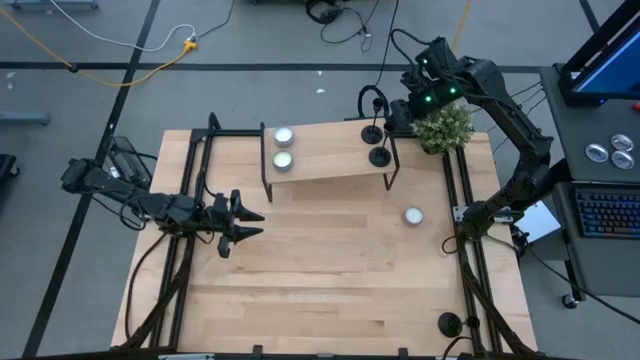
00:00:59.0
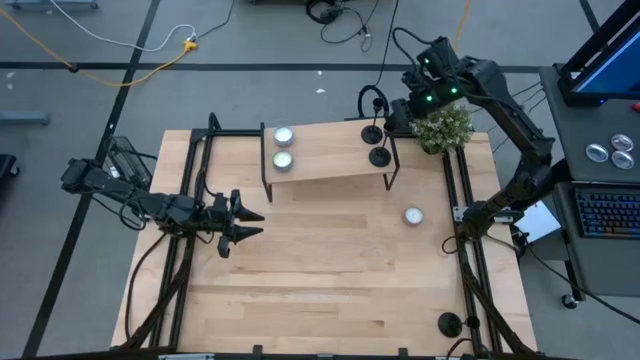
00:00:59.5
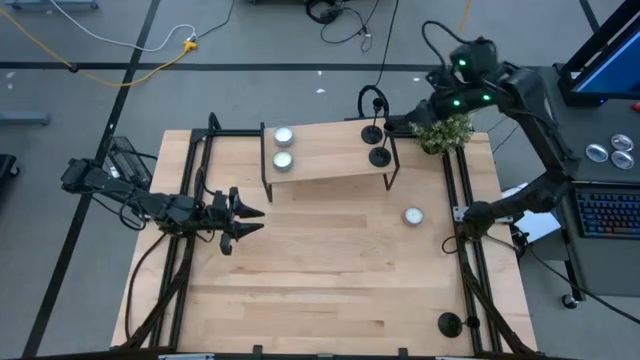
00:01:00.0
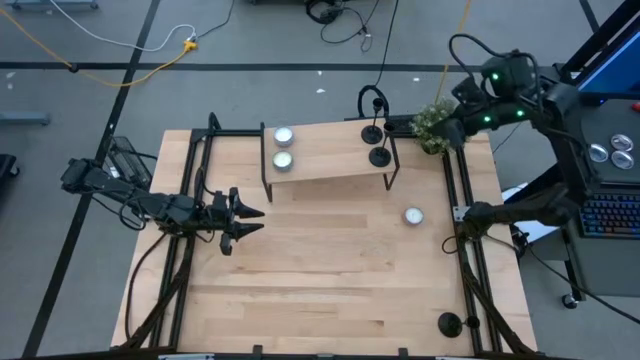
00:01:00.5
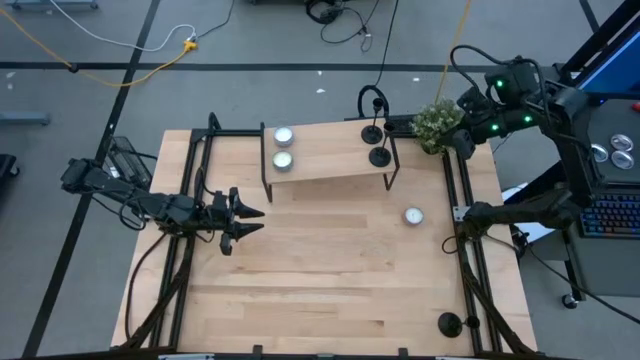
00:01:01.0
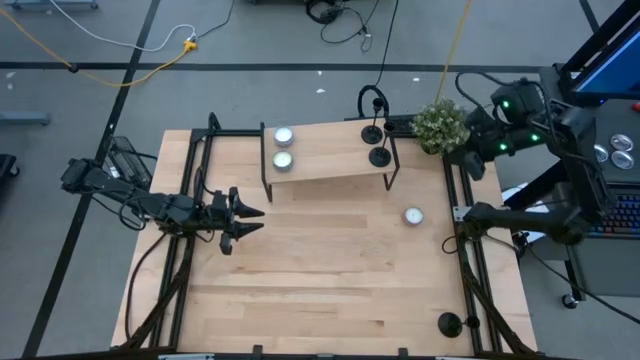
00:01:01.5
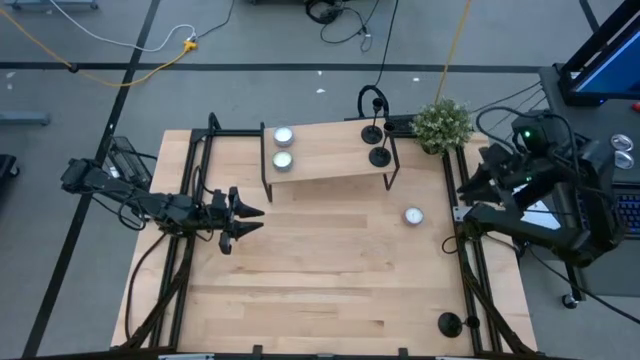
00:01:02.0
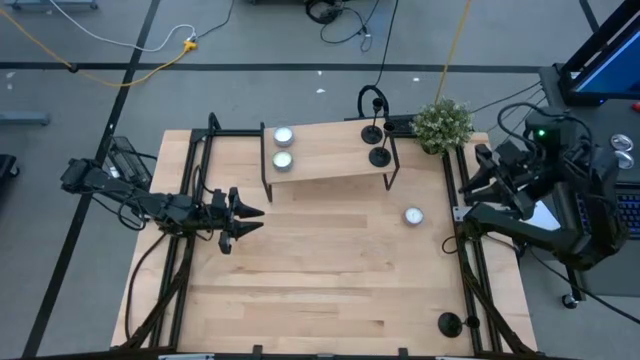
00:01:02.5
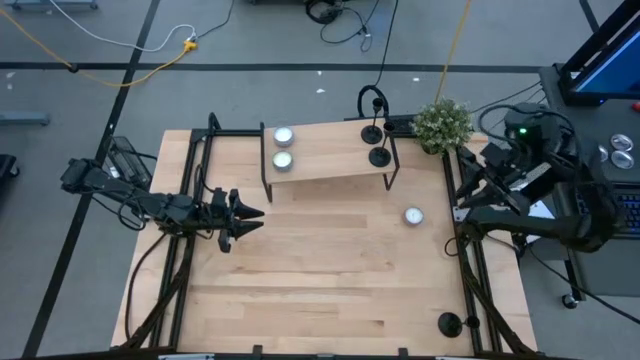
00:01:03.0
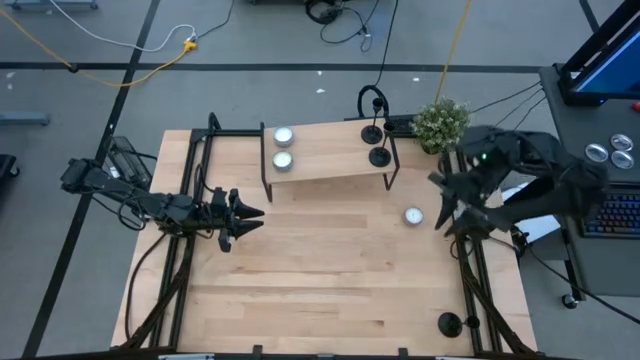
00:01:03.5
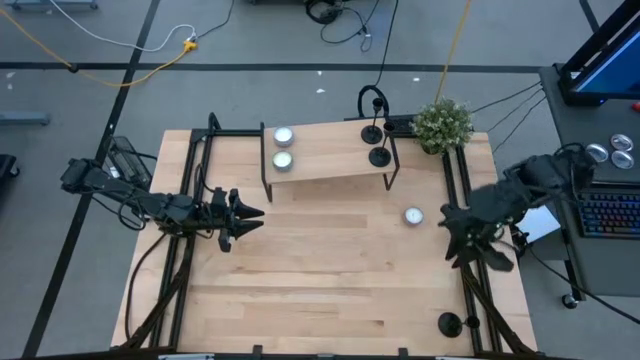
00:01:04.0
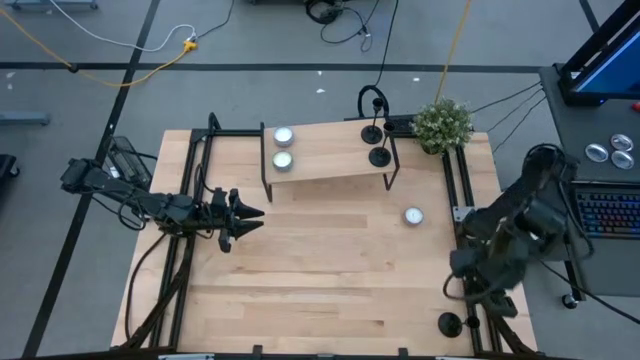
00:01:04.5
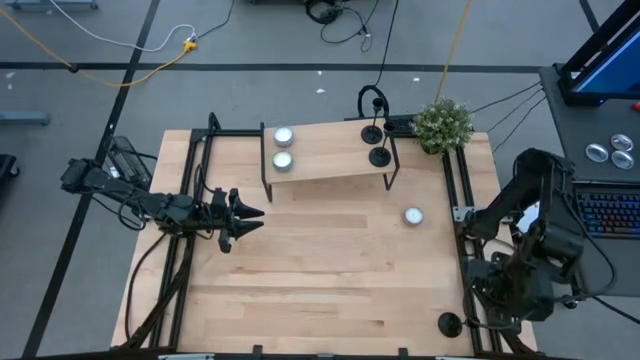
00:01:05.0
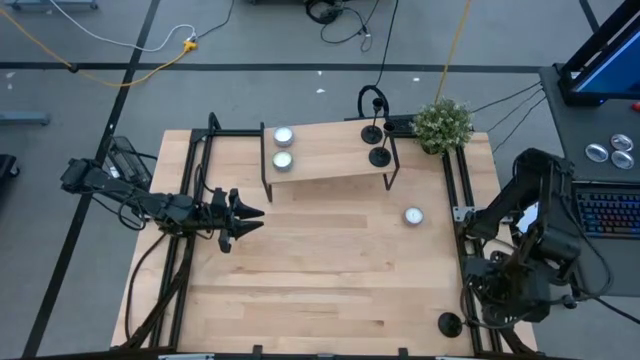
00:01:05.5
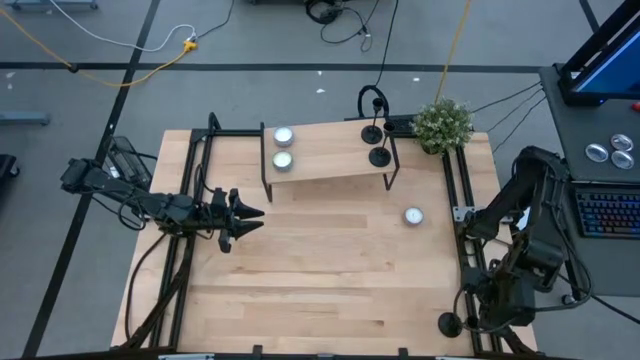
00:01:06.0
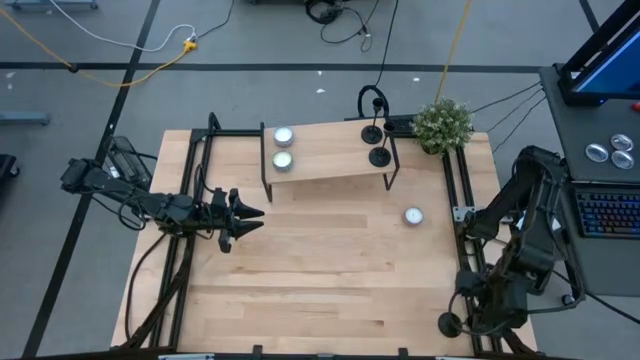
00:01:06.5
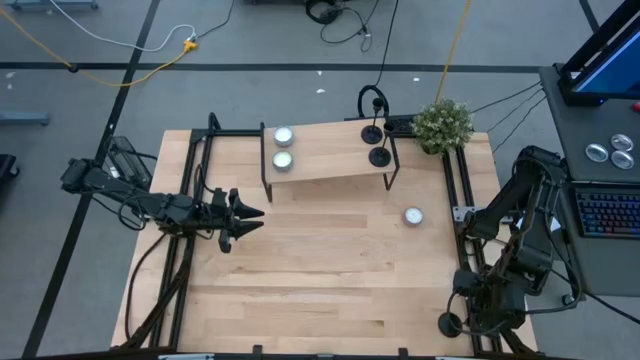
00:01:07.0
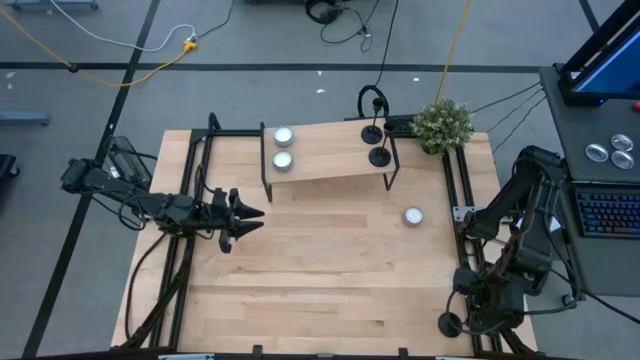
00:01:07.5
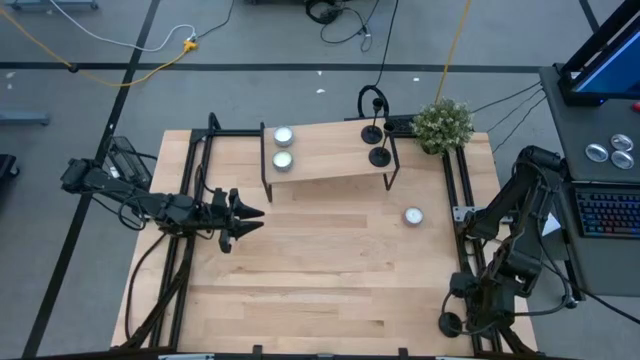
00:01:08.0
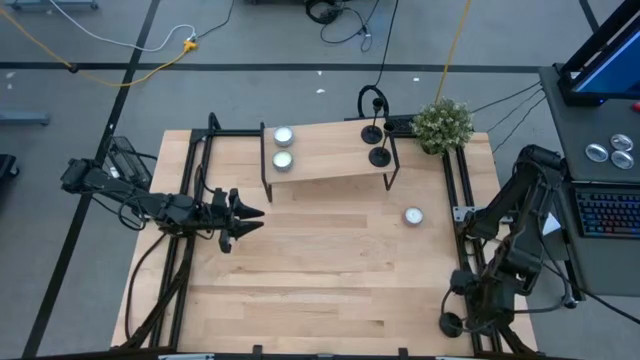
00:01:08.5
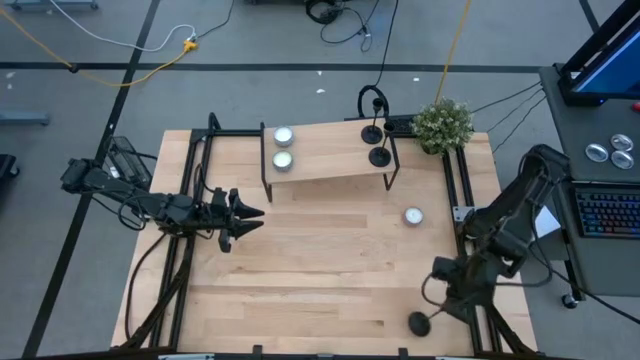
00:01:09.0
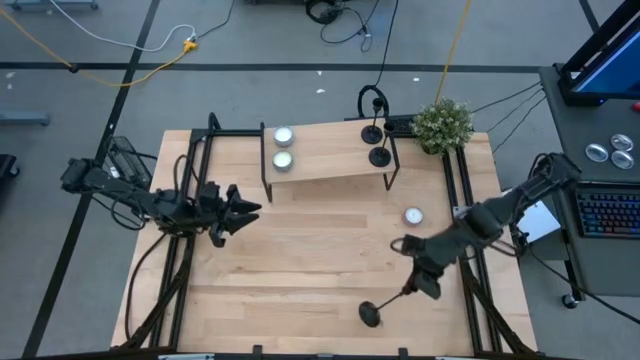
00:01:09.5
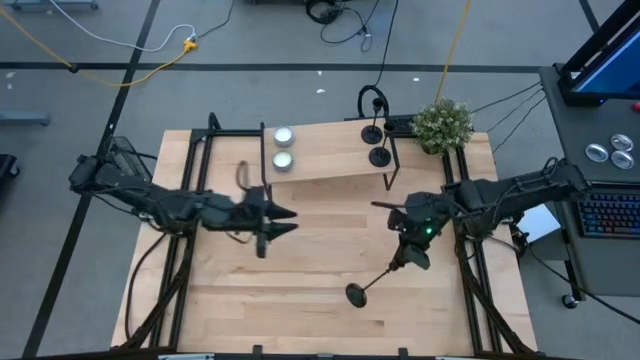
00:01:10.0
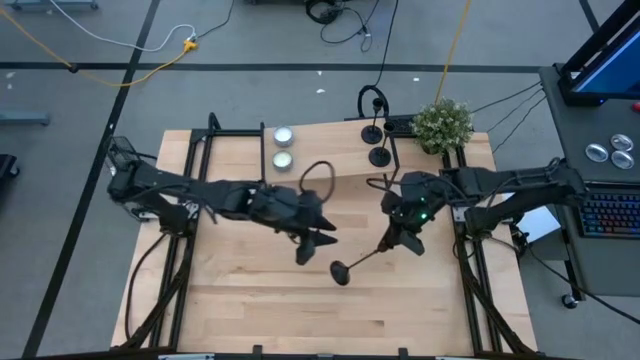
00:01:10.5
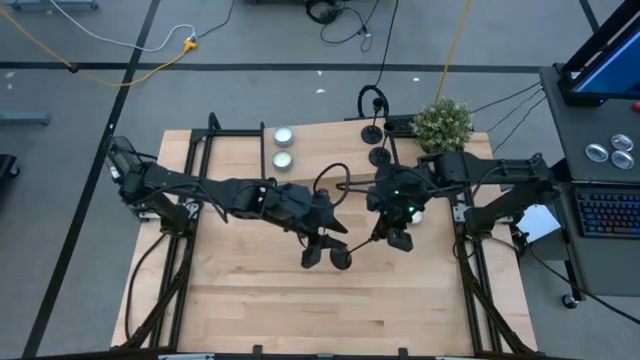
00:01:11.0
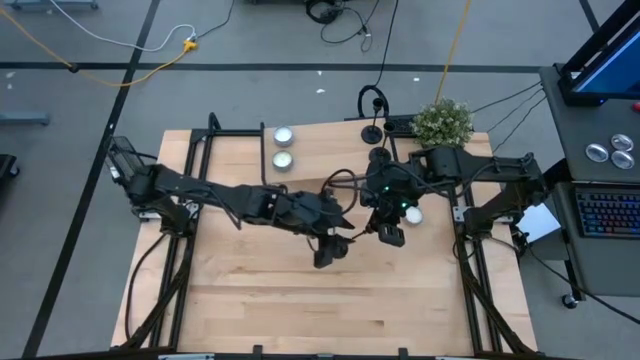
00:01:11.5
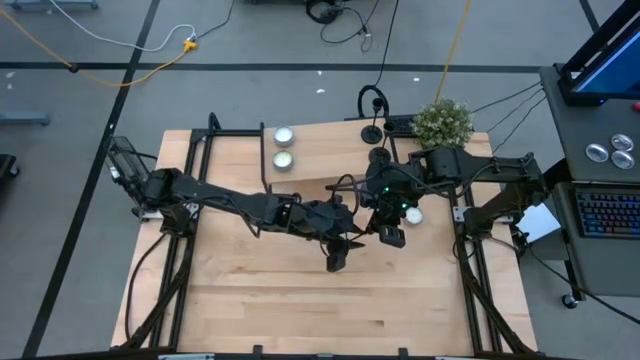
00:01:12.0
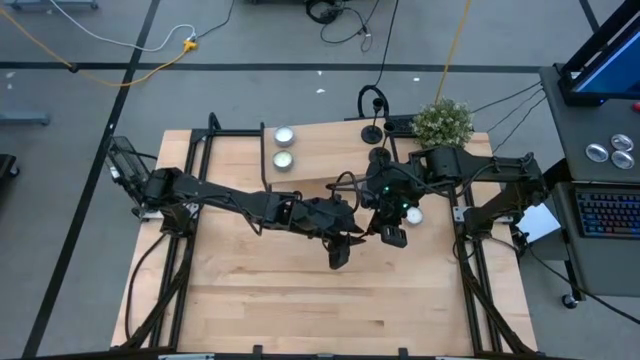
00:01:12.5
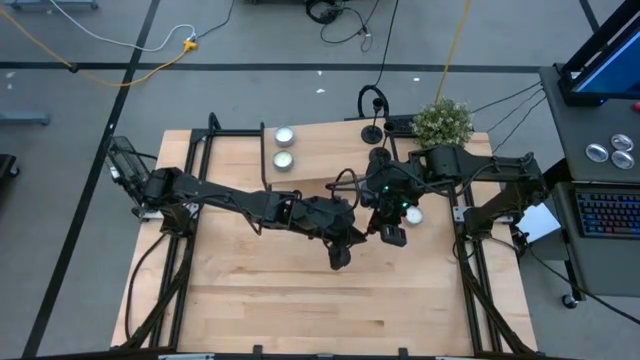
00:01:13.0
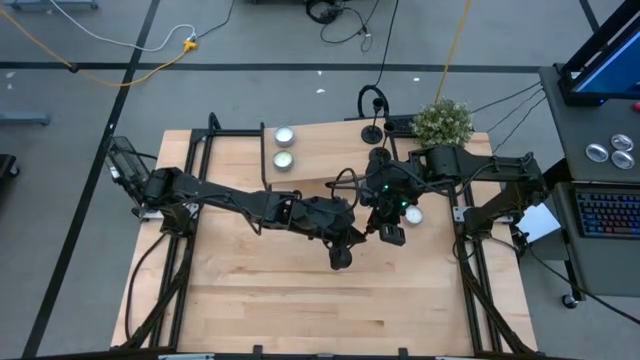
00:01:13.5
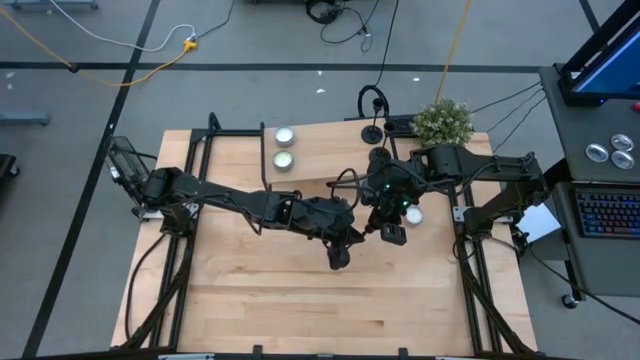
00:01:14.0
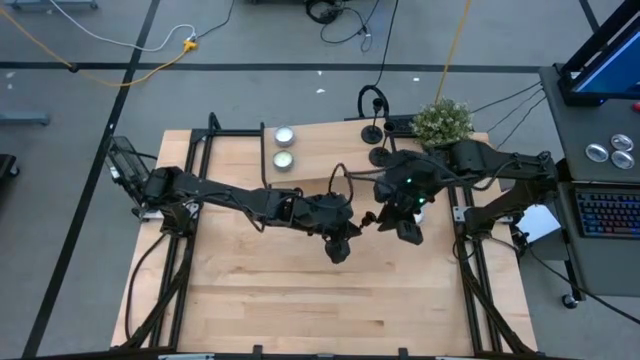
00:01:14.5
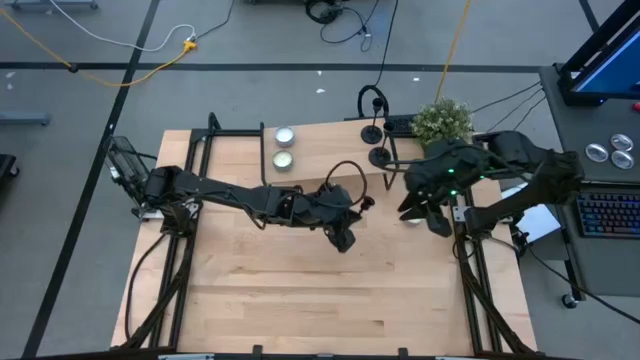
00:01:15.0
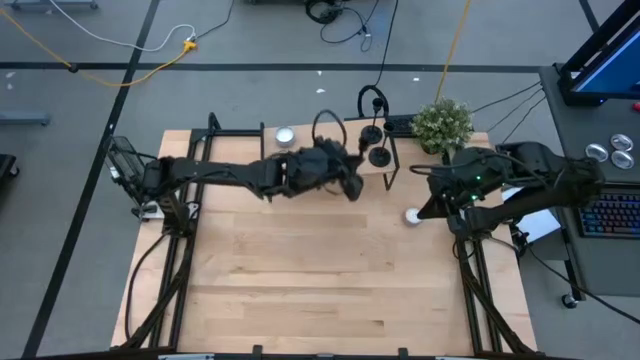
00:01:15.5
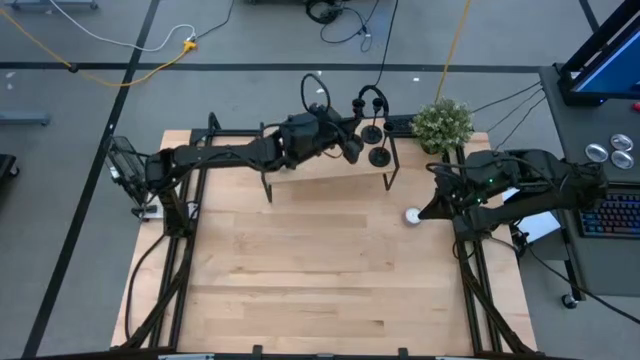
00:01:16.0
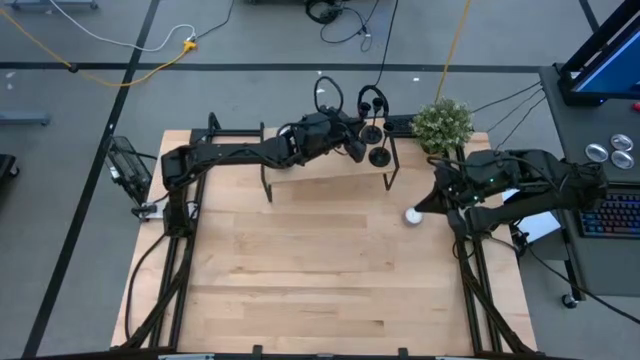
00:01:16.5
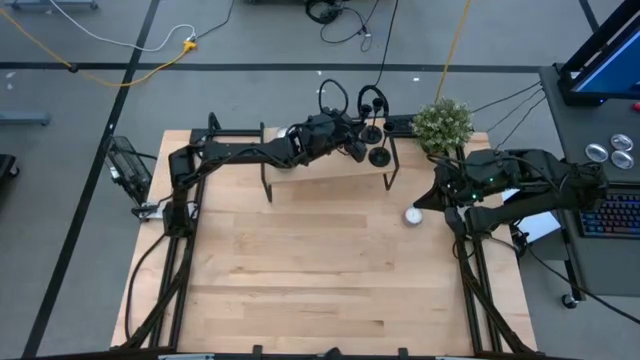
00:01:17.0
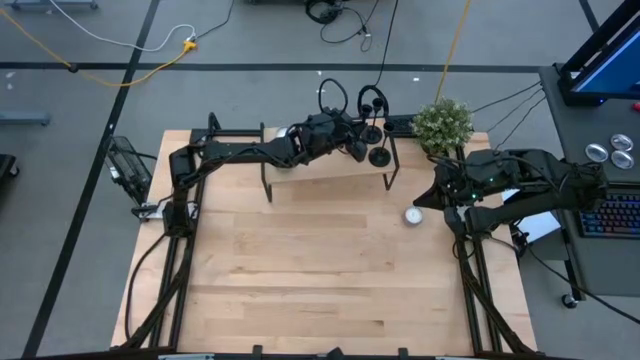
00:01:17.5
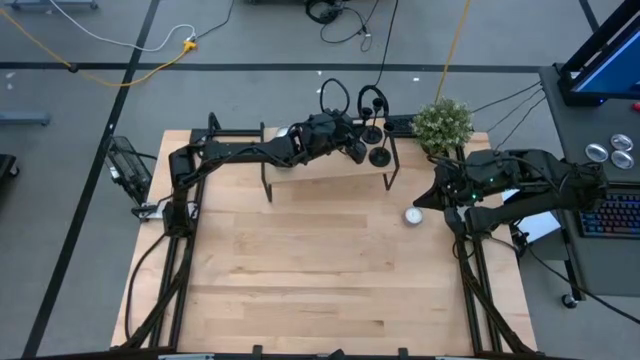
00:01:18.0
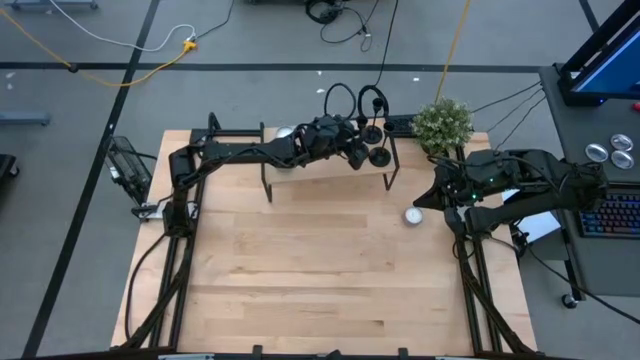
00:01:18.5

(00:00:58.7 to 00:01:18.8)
Task: Pick & Place candle stick holders
Put the black candle holder on the shelf

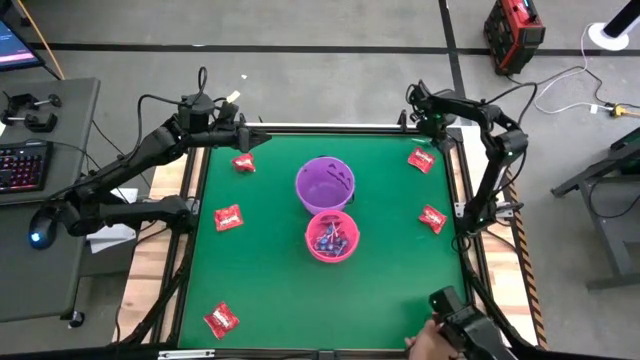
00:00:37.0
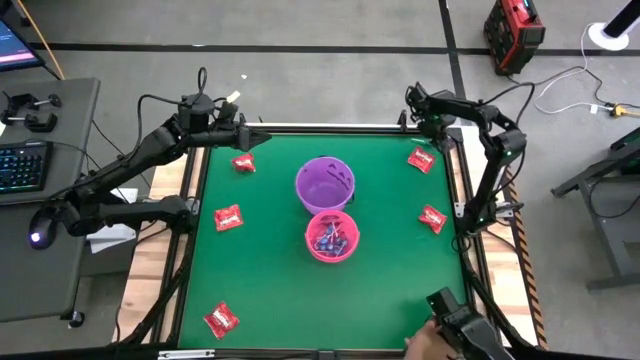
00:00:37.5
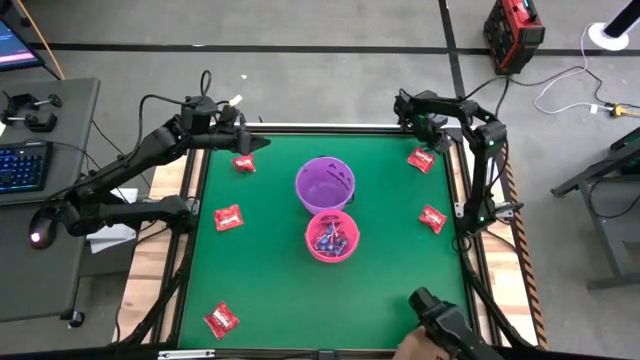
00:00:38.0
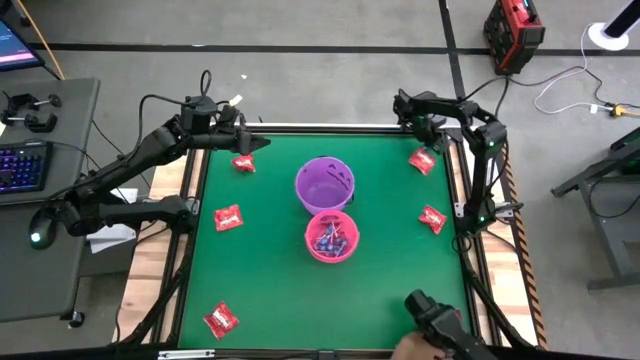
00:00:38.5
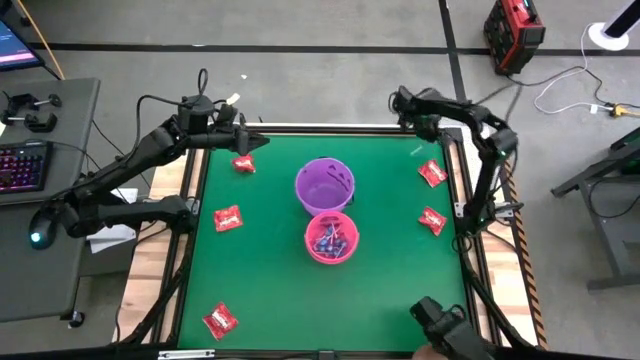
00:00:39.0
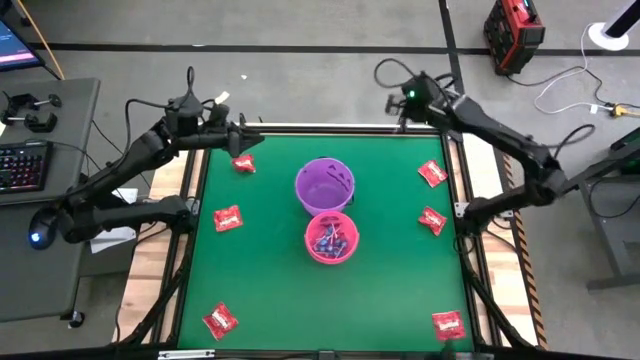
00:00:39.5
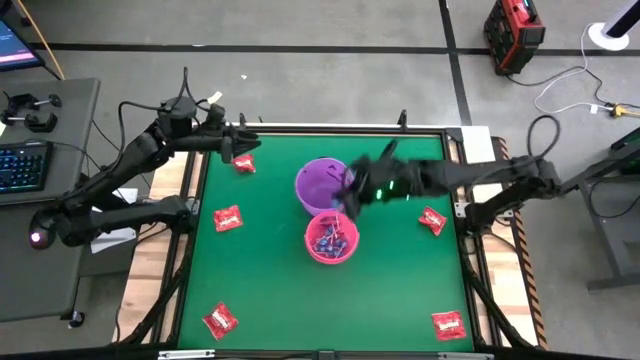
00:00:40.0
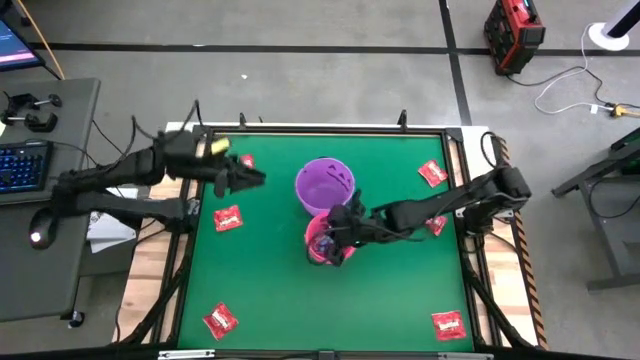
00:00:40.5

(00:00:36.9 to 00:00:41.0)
Task: Sort candy by brand, put in halloween buckets
Put the blue candy into the pink bucket
